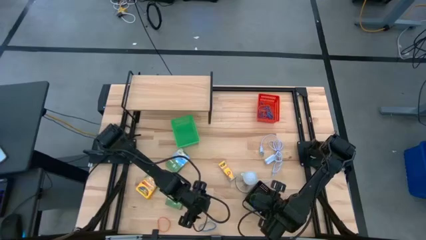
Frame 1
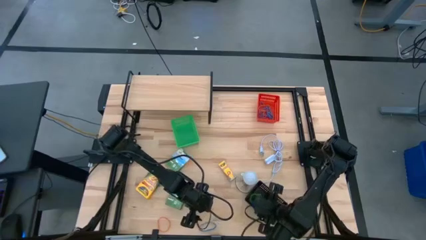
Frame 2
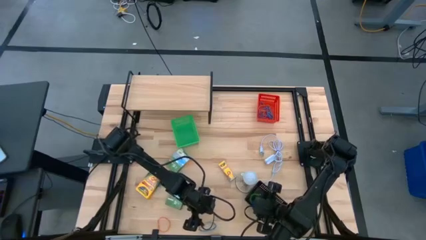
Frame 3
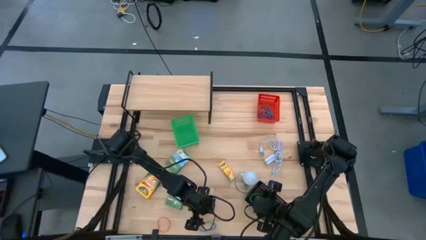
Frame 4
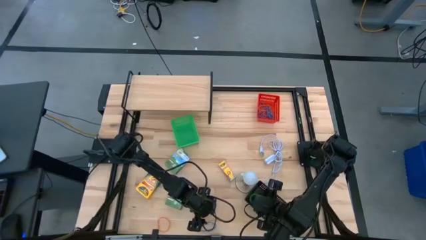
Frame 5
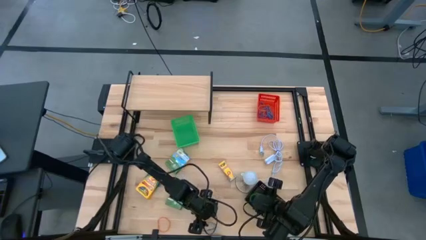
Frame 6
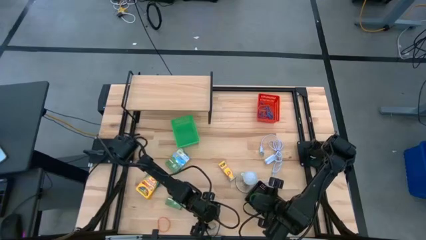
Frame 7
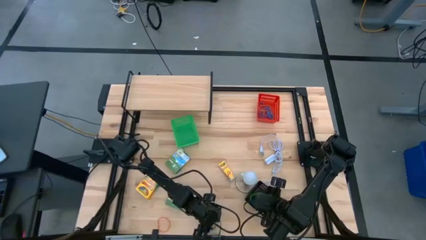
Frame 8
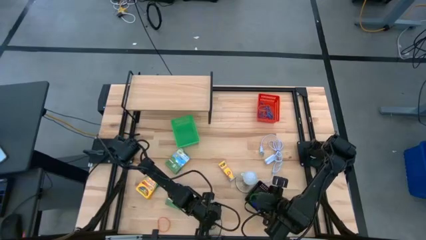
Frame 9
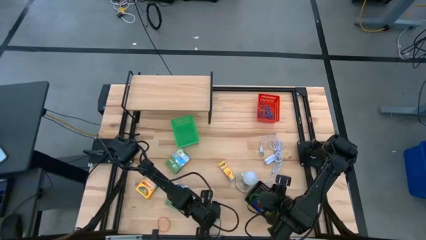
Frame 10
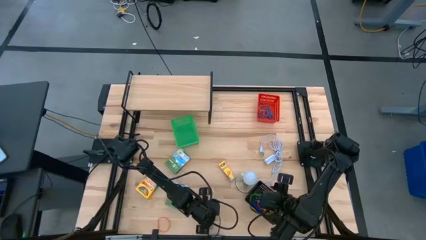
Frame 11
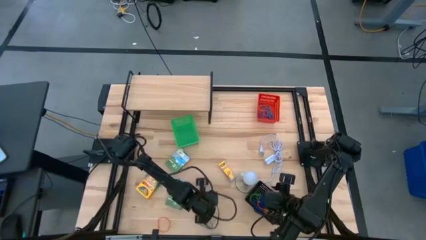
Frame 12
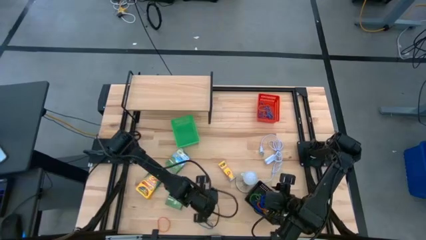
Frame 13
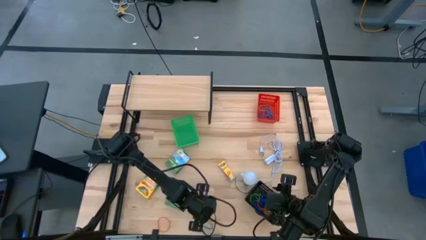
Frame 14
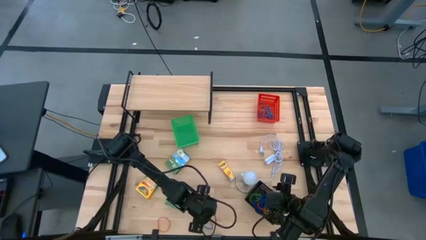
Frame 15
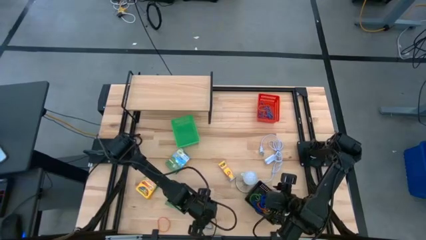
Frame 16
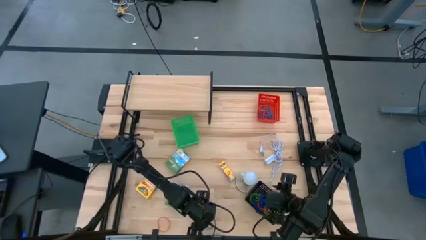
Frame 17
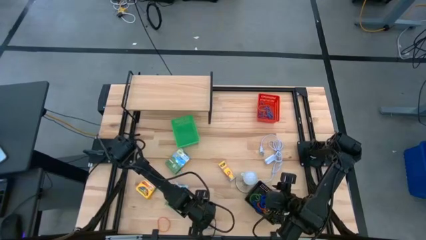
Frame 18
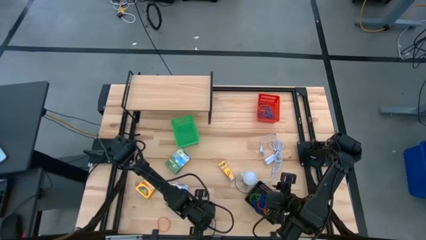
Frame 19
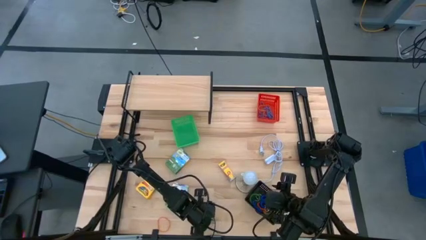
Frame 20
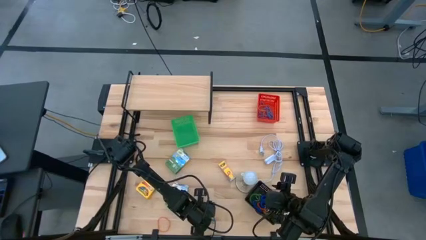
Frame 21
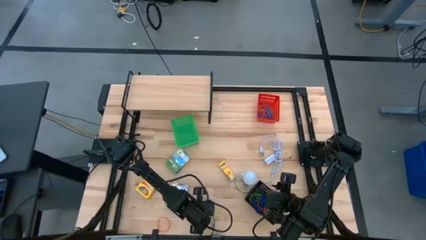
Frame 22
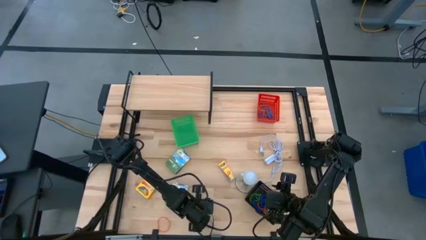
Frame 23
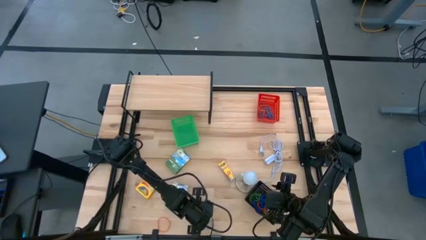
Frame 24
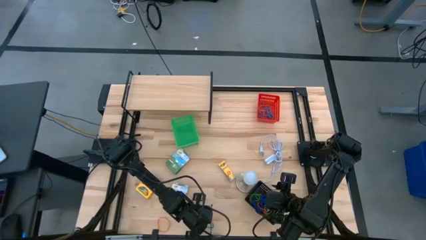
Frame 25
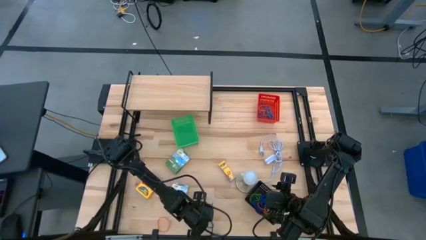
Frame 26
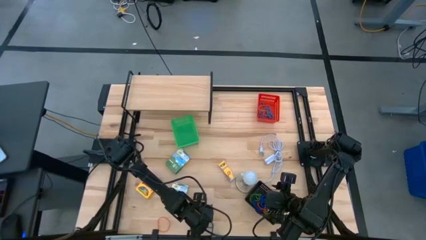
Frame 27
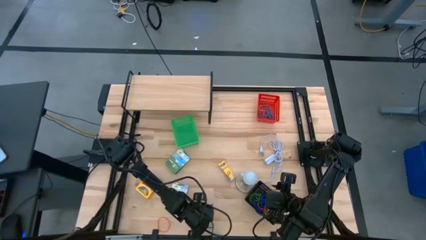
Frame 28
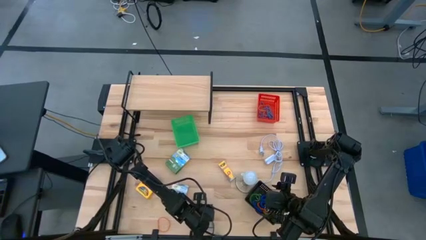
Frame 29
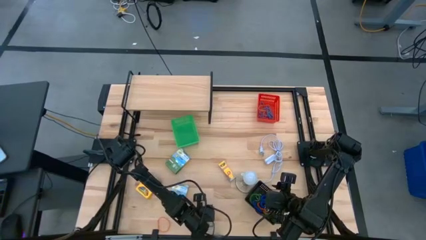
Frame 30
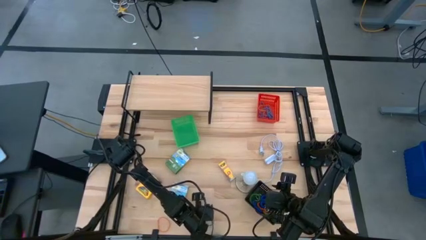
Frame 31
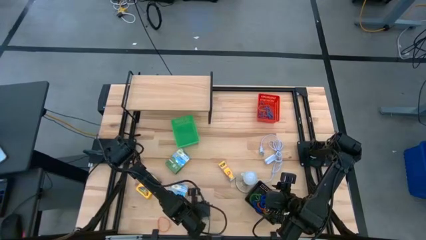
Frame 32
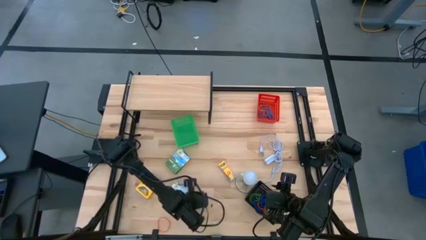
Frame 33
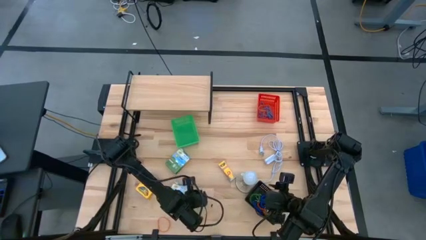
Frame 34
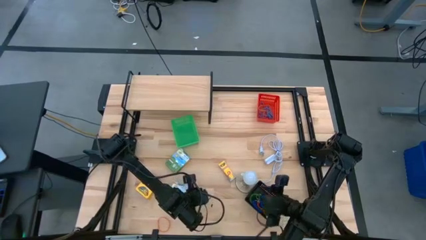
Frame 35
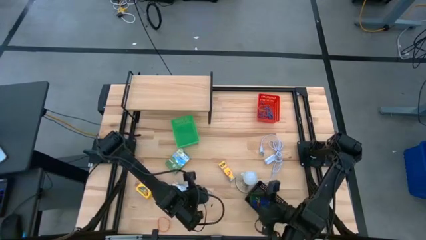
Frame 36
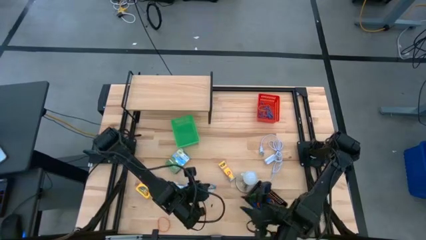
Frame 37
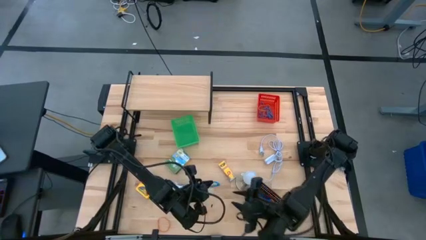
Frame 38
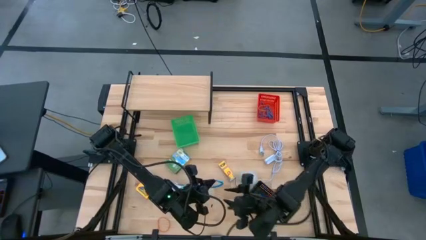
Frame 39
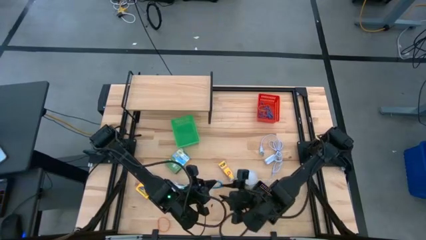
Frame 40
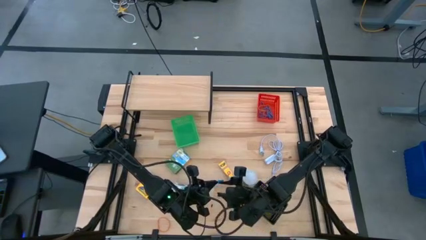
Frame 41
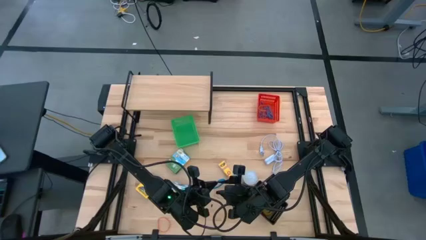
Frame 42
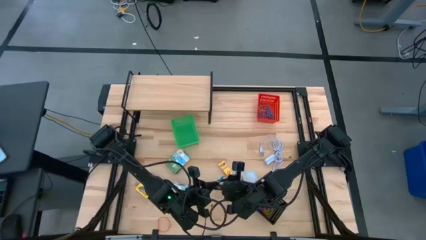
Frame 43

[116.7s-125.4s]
Task: Pick & Place Office Desk Supplies
Put the blue rubber band into the red basket

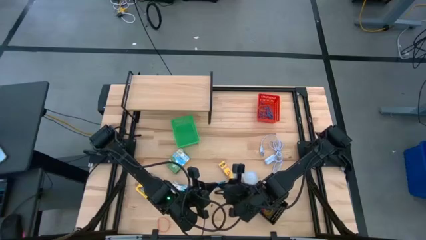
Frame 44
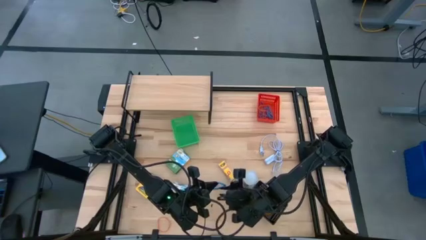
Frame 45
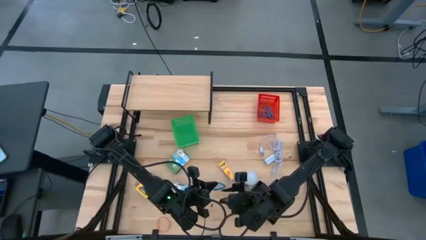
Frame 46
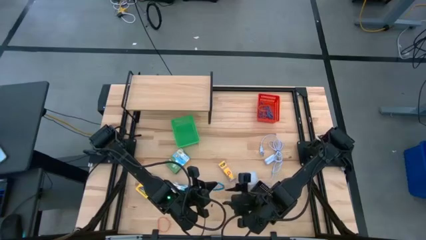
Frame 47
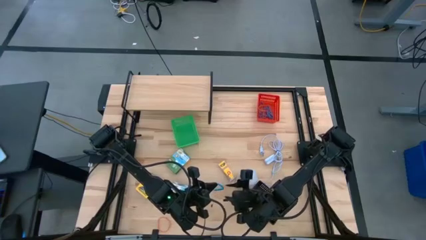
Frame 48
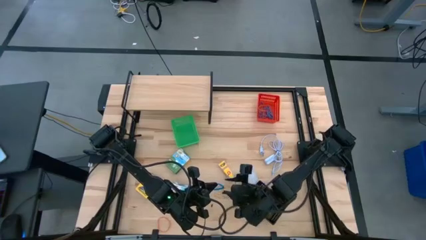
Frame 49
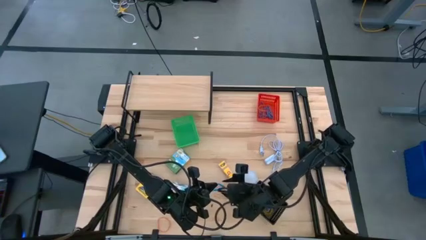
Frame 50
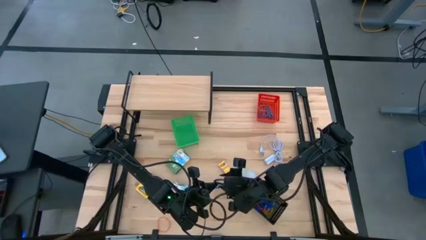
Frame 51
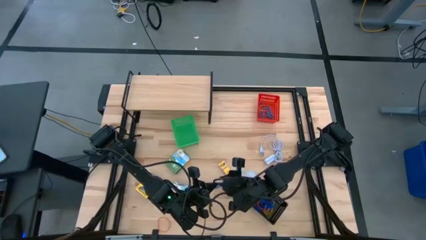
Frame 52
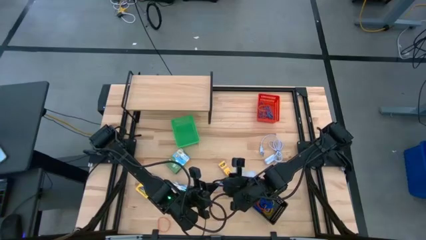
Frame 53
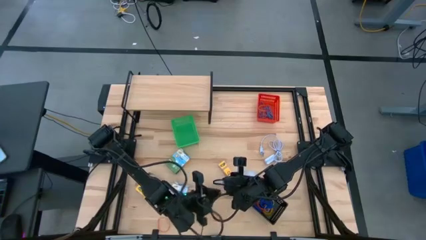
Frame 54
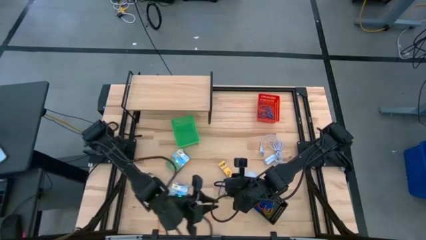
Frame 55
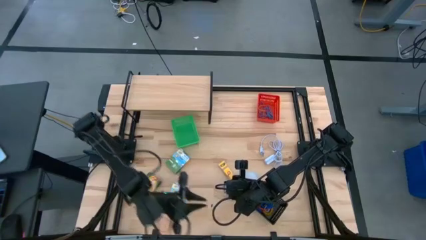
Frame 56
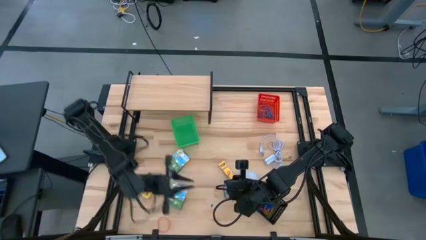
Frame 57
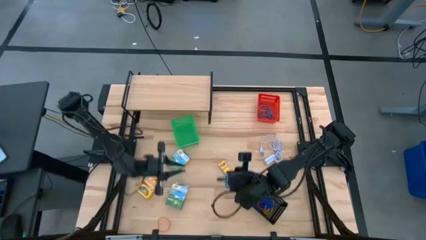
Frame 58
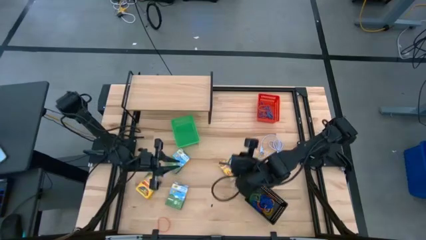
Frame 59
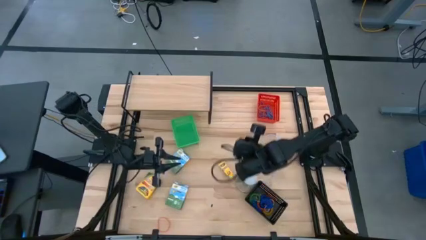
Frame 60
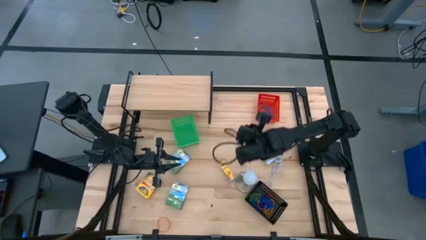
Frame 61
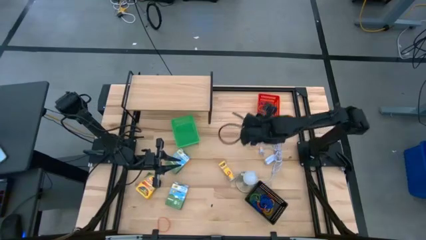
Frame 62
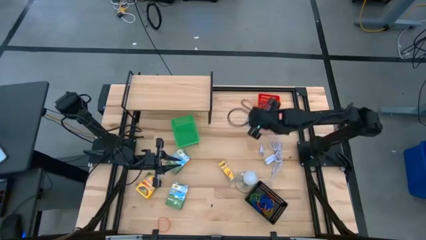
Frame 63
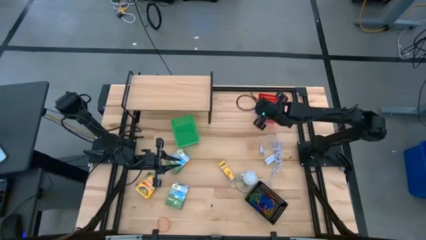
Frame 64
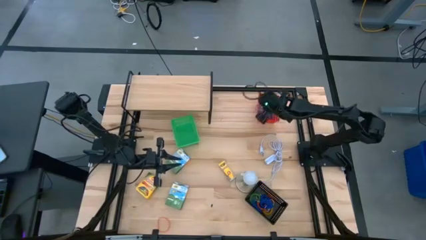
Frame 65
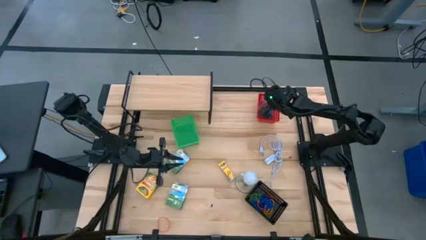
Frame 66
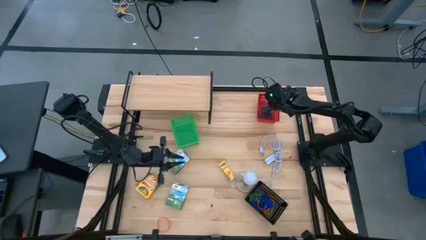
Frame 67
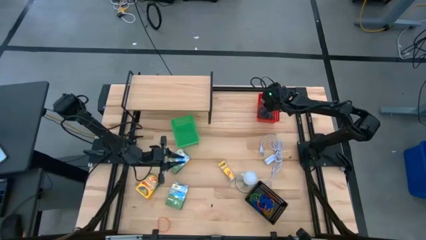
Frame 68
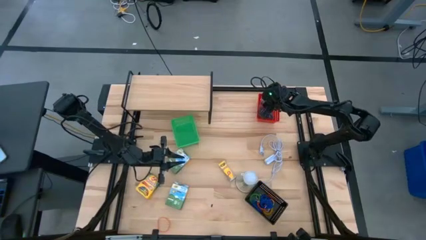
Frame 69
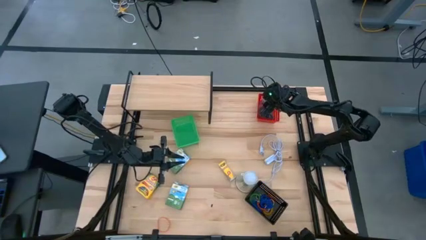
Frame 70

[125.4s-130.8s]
Put the blue rubber band into the red basket
